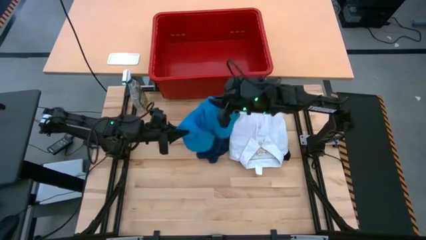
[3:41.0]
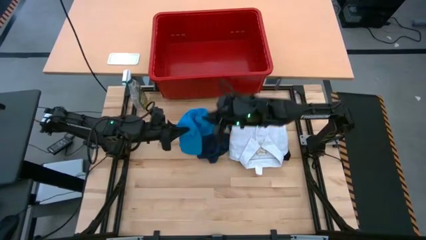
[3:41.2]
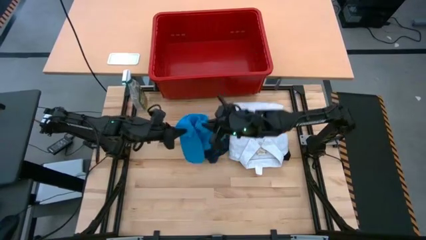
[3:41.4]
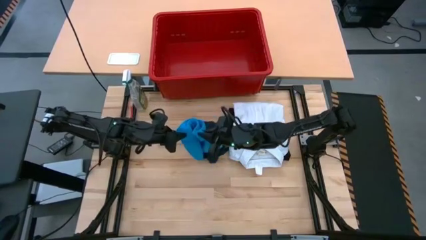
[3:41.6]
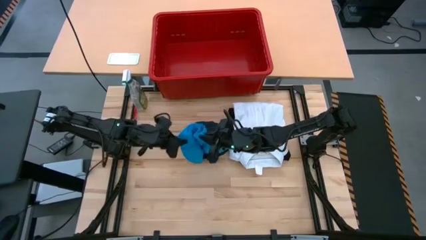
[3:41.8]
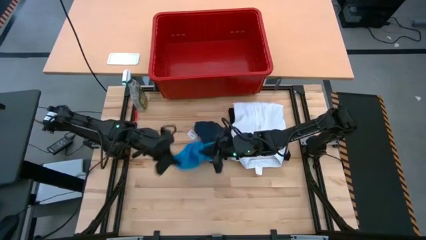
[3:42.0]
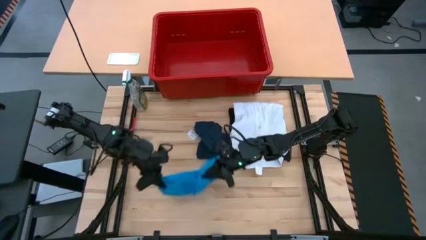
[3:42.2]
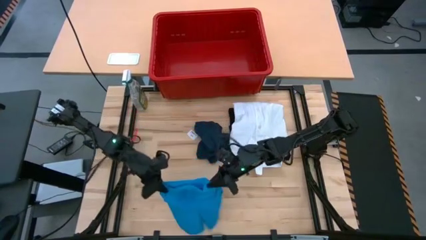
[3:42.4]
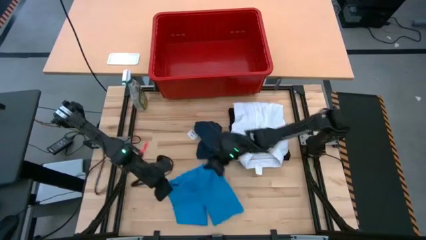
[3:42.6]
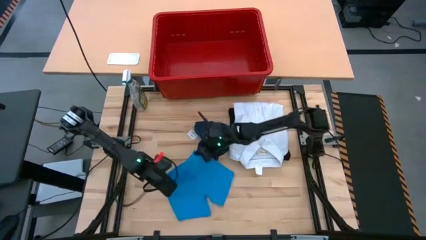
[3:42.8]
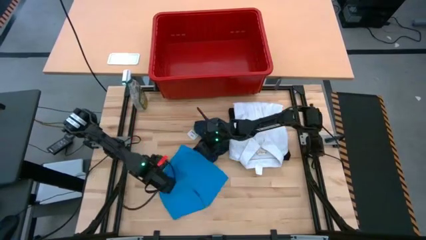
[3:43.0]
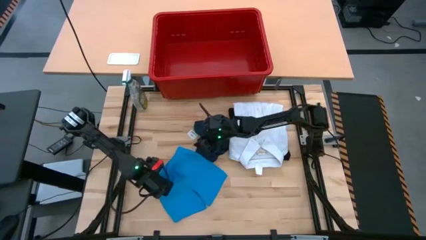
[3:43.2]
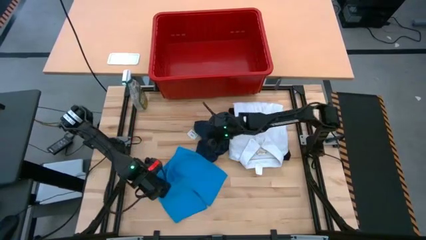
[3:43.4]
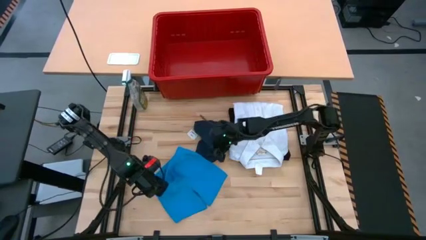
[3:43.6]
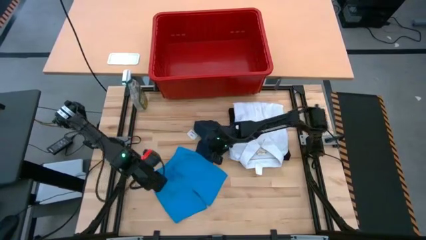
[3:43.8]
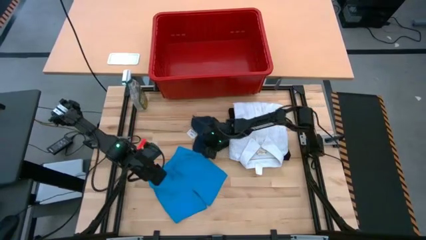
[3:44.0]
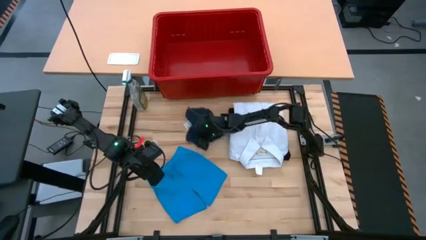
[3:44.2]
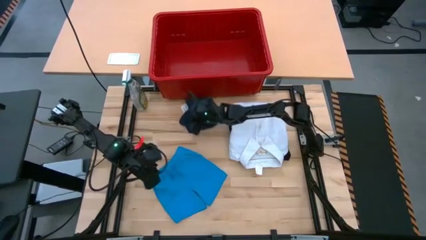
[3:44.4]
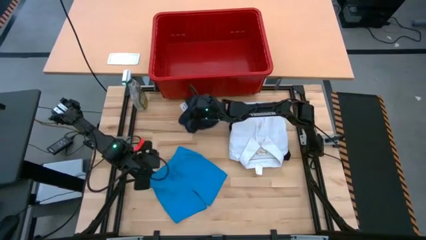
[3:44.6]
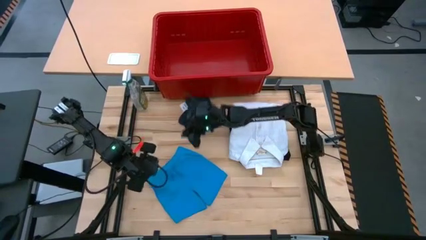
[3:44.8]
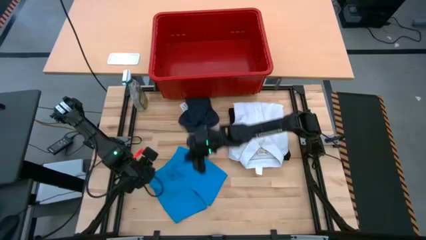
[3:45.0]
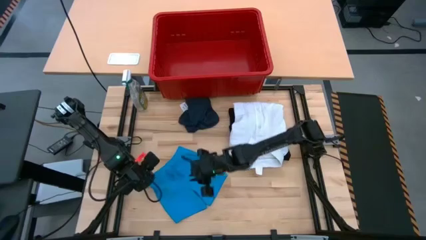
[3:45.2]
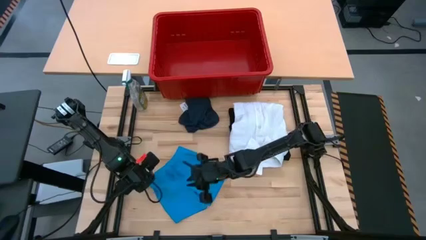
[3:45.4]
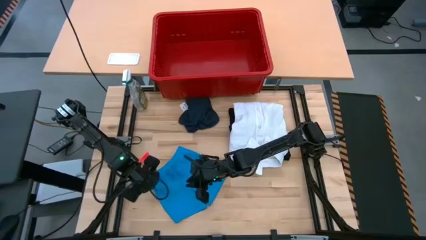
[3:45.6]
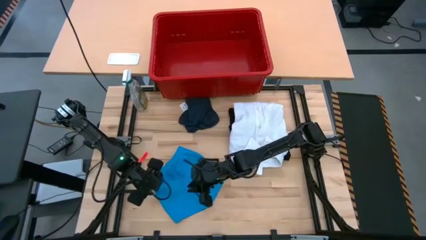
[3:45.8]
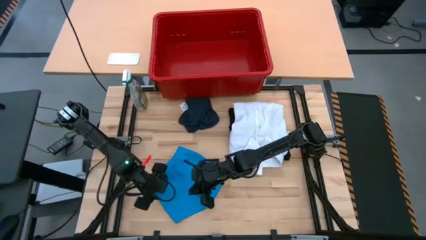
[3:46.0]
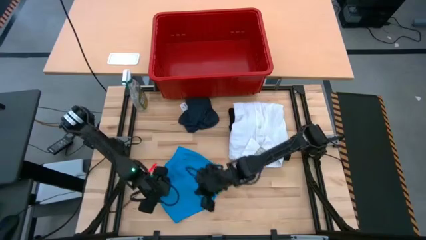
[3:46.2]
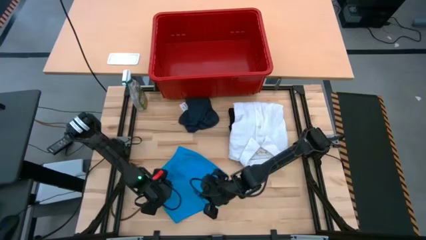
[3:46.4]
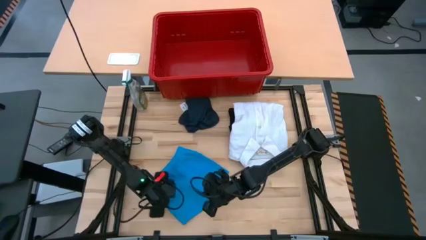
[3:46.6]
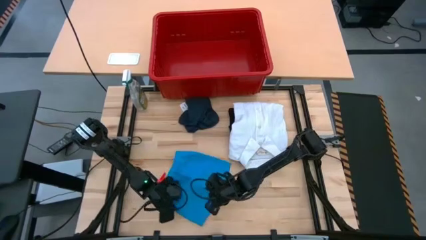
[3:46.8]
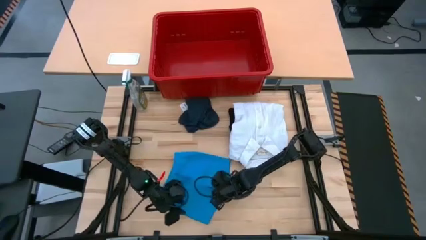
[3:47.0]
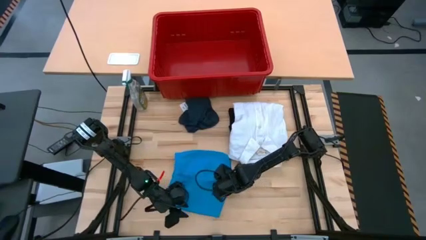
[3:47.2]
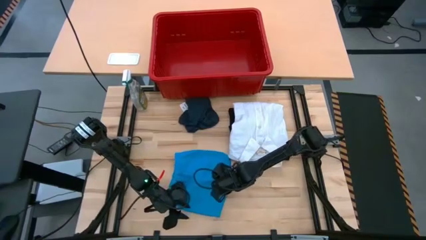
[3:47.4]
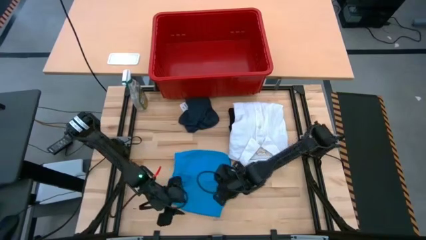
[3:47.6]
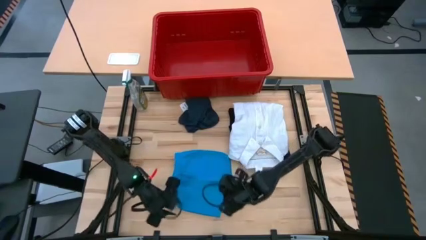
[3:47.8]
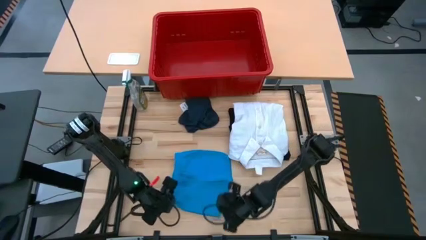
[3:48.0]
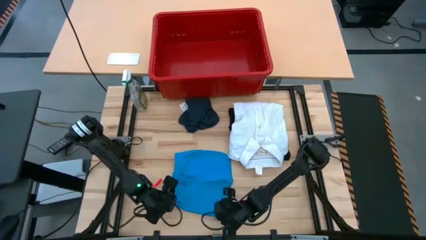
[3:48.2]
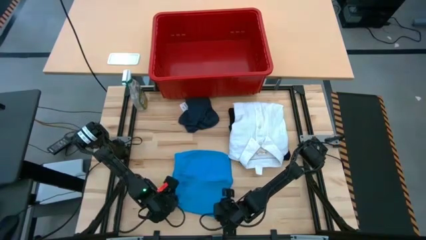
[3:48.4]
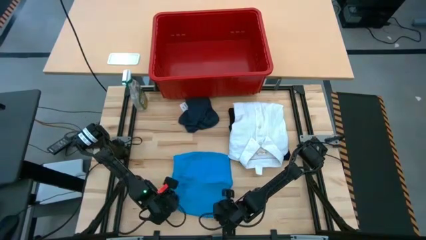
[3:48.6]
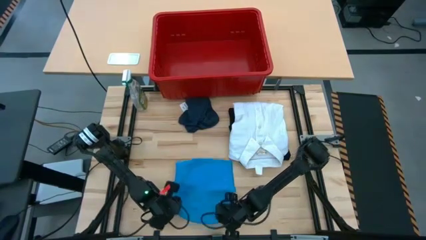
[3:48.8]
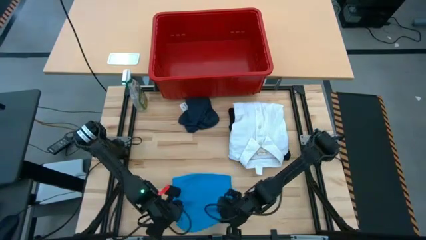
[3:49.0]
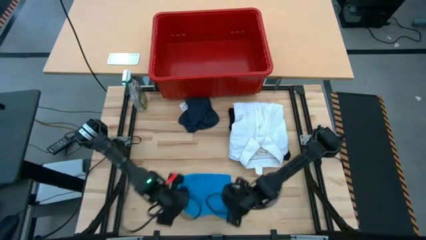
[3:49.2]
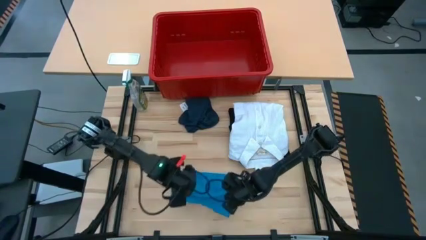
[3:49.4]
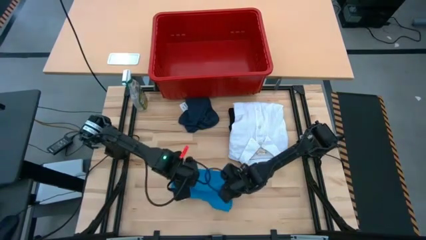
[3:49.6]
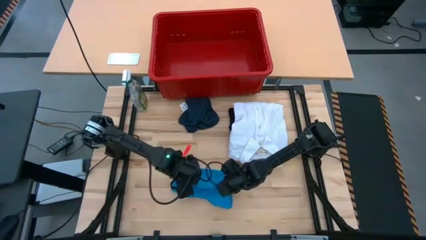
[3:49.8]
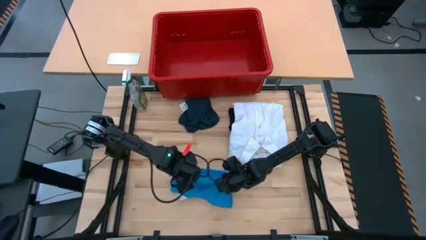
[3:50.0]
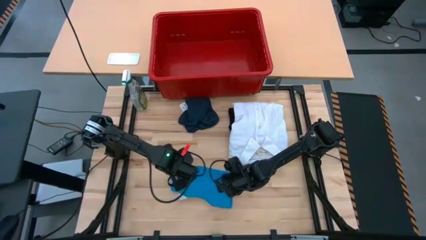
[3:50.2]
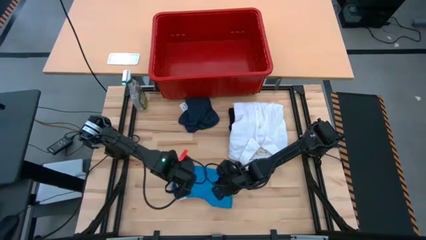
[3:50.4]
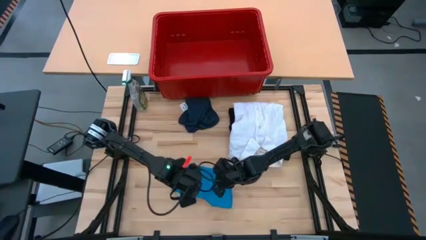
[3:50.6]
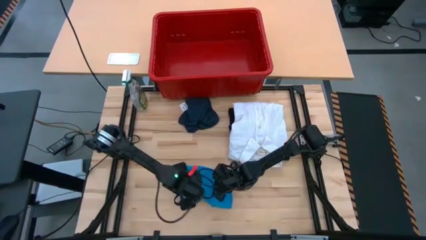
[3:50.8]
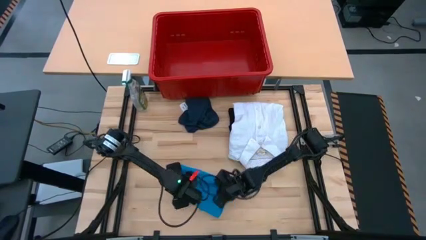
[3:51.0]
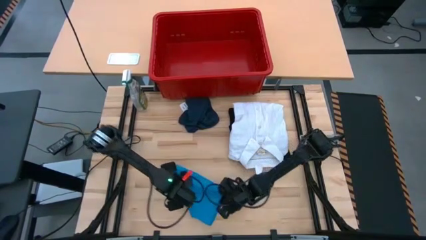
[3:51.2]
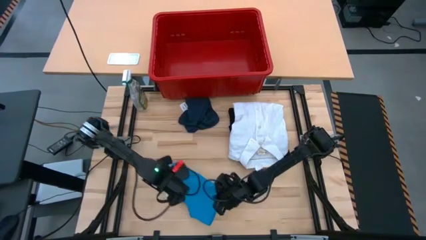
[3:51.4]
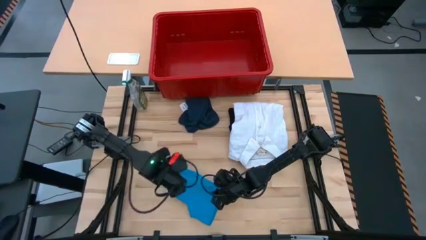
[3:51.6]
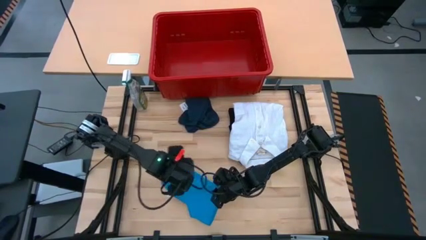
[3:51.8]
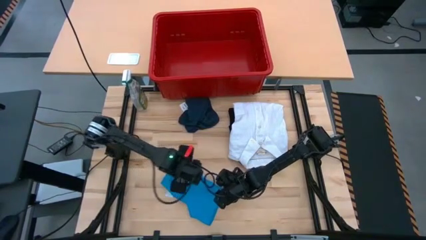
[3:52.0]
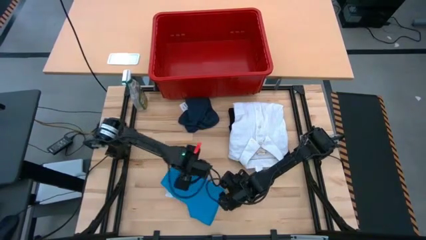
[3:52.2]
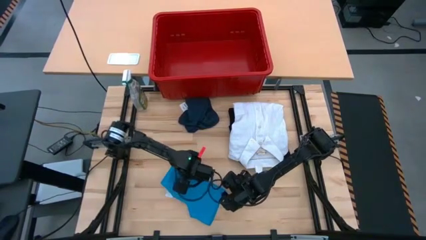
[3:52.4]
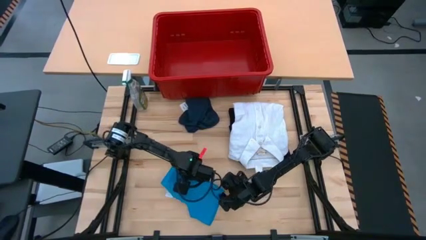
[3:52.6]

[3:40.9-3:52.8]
Task: Fold laundry
Fold the blue shorts on the table

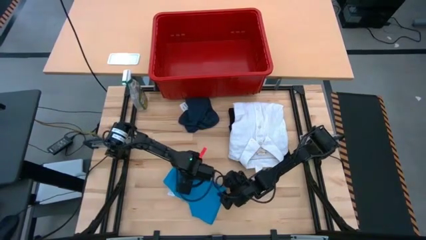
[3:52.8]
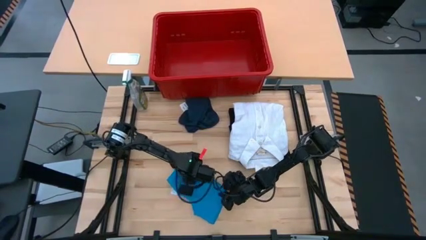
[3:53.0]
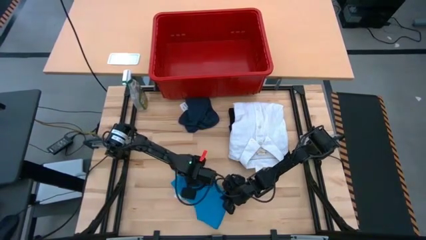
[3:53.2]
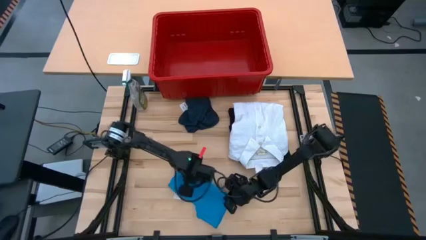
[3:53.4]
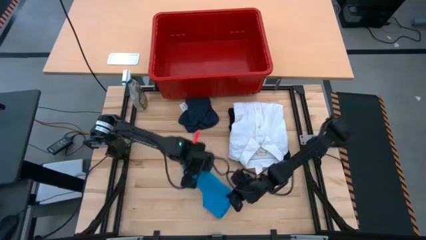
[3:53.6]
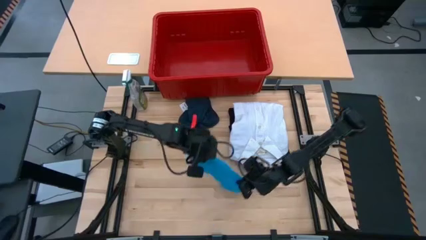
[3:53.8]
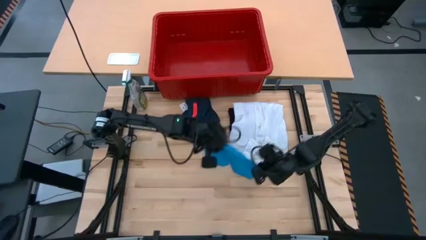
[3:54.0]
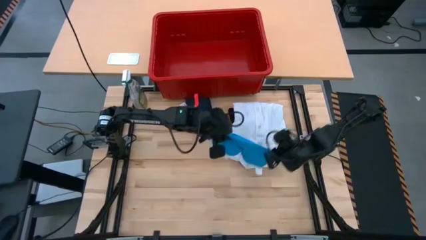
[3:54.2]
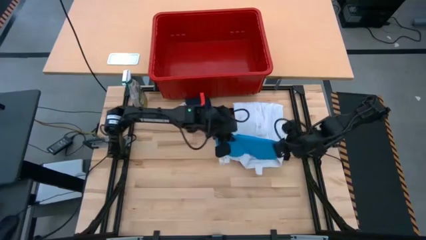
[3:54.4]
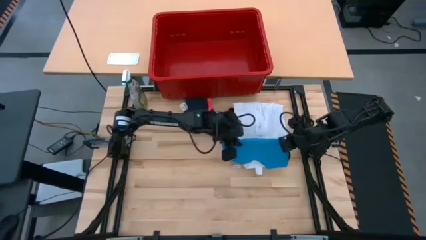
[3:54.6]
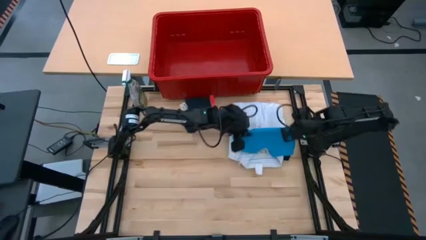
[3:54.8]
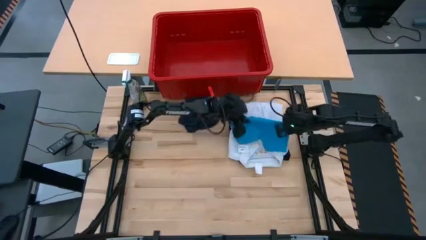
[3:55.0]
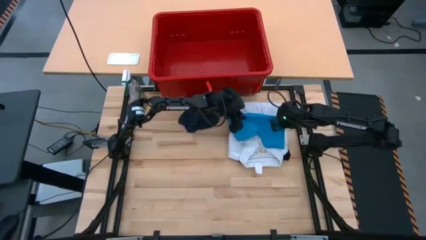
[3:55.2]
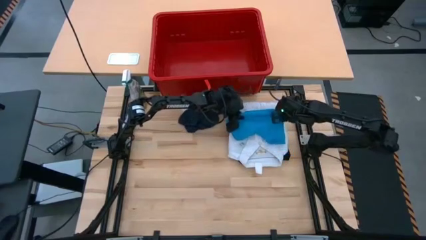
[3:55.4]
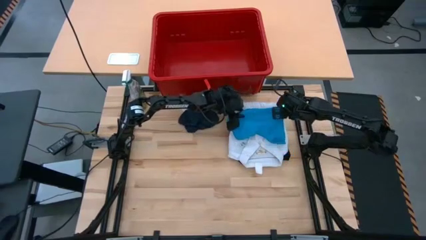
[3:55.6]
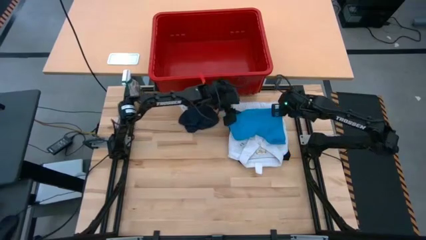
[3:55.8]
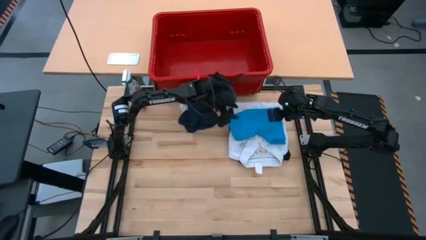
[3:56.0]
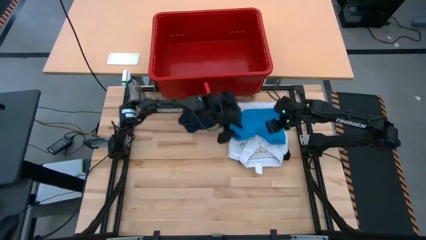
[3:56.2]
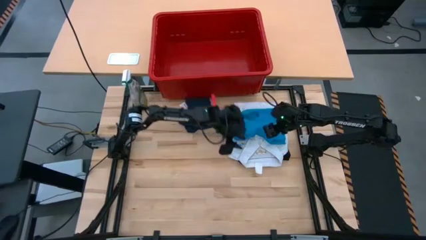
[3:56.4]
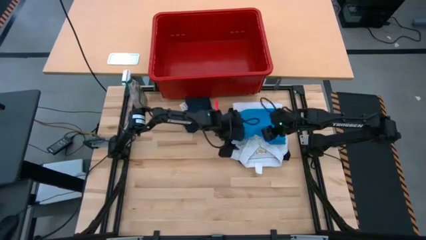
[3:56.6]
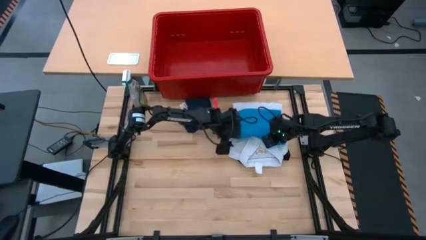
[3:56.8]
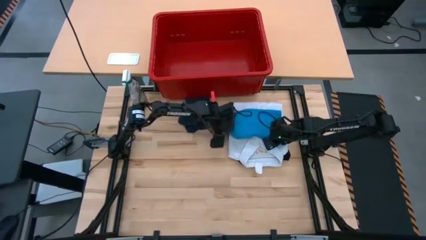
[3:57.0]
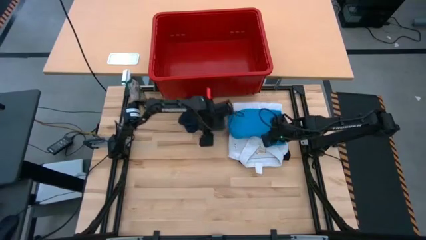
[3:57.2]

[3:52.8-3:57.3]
Stack the blue shorts on top of the white polo shirt
